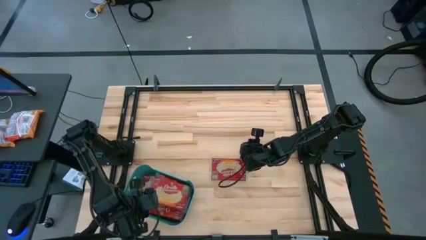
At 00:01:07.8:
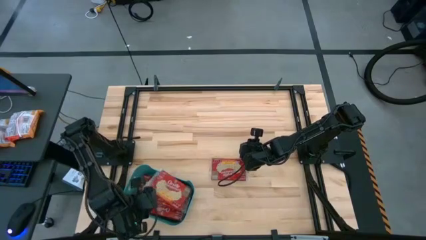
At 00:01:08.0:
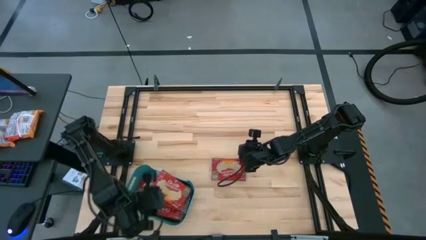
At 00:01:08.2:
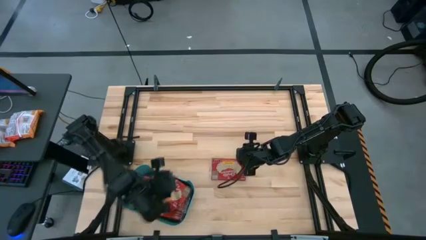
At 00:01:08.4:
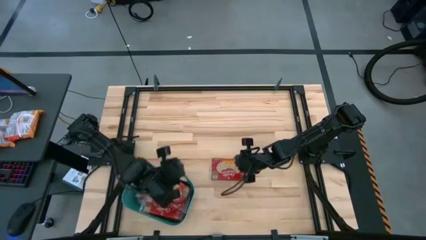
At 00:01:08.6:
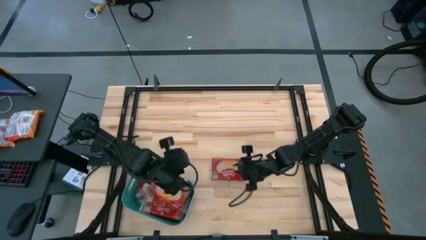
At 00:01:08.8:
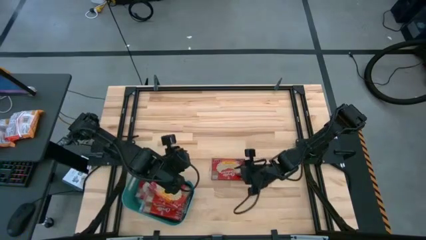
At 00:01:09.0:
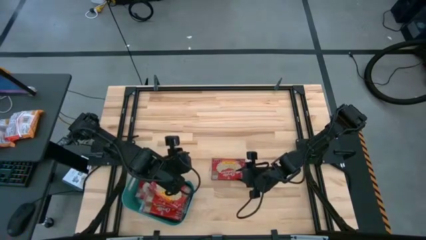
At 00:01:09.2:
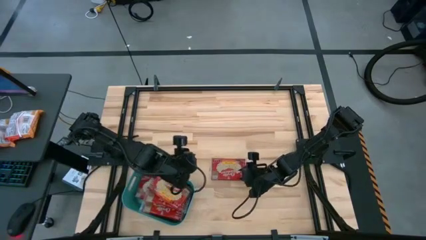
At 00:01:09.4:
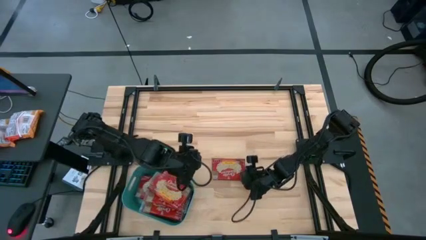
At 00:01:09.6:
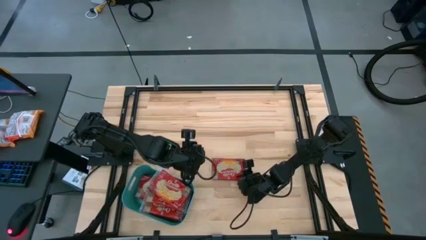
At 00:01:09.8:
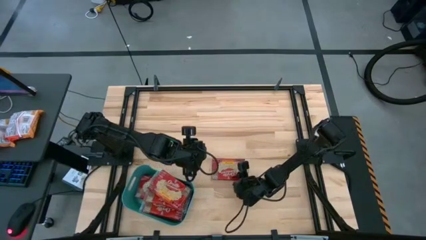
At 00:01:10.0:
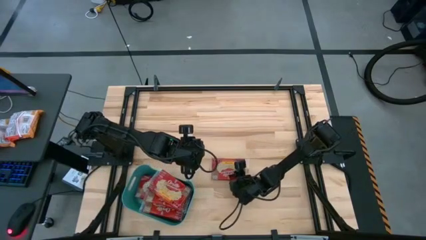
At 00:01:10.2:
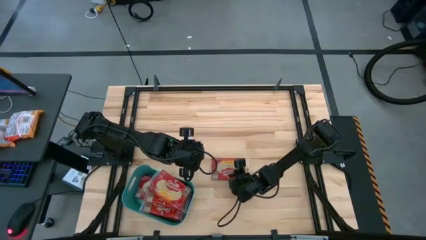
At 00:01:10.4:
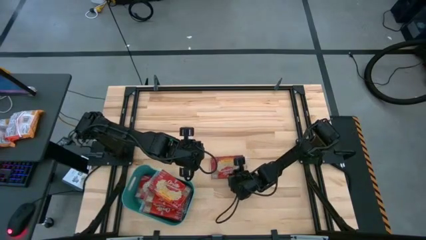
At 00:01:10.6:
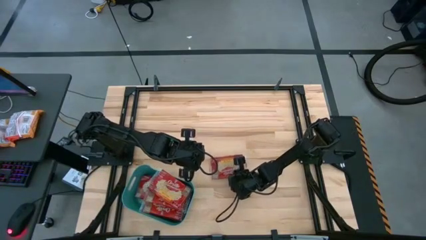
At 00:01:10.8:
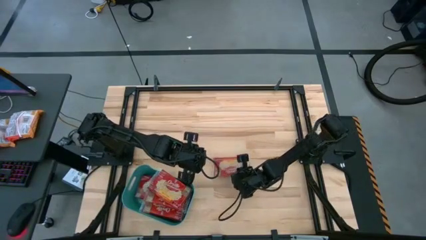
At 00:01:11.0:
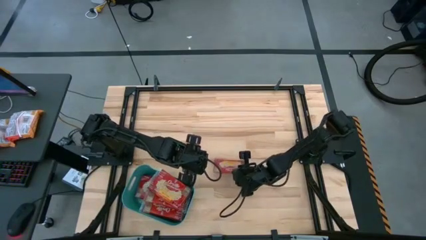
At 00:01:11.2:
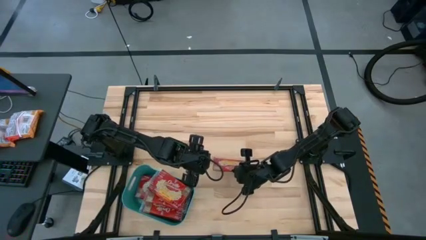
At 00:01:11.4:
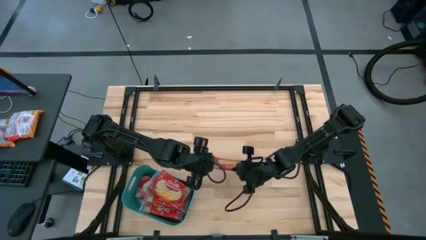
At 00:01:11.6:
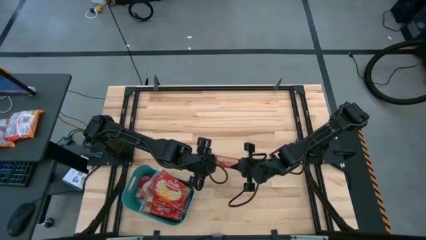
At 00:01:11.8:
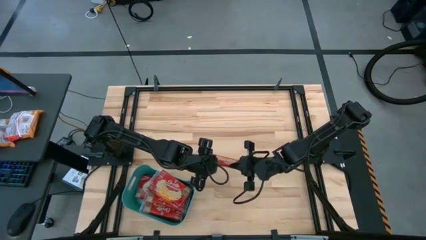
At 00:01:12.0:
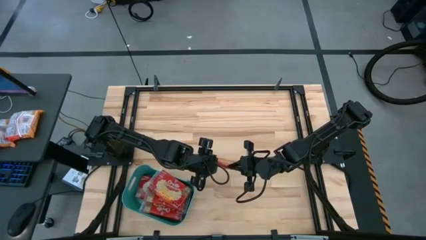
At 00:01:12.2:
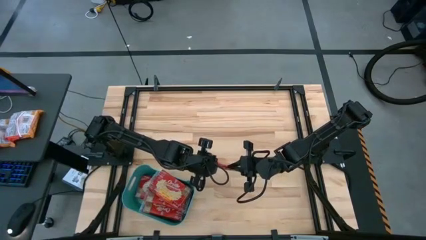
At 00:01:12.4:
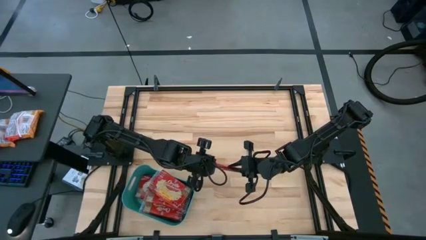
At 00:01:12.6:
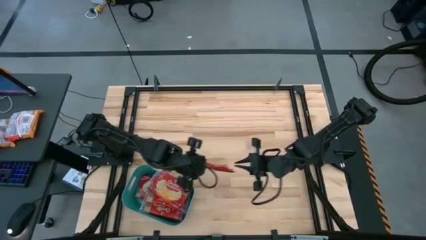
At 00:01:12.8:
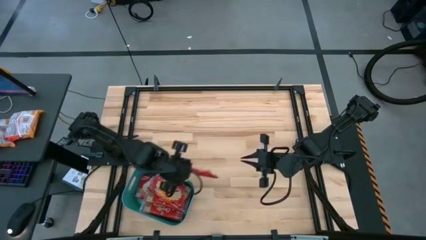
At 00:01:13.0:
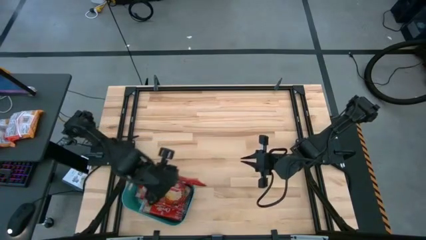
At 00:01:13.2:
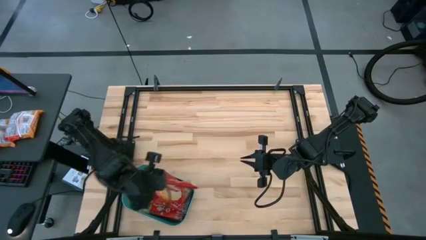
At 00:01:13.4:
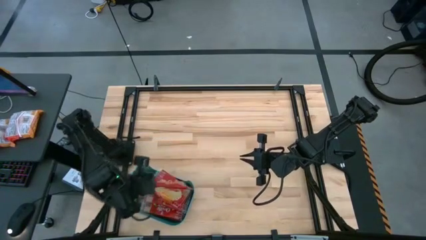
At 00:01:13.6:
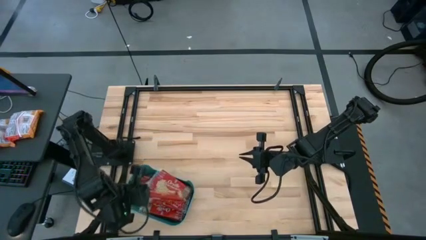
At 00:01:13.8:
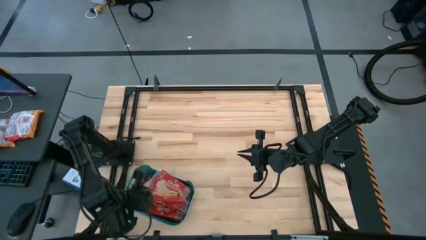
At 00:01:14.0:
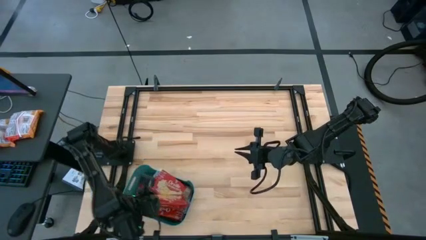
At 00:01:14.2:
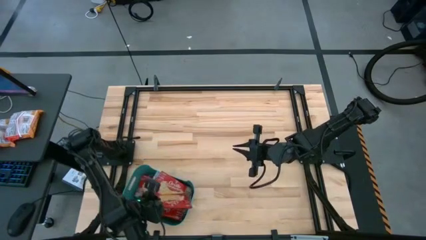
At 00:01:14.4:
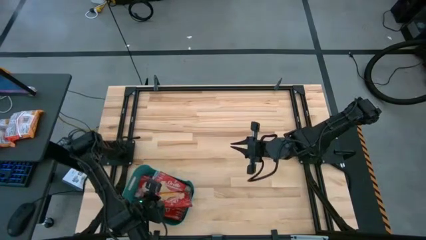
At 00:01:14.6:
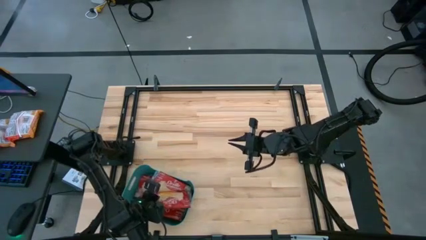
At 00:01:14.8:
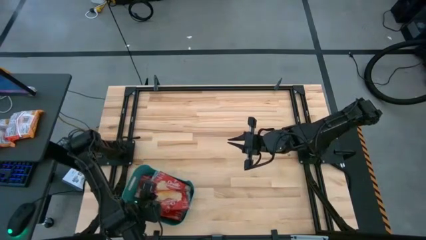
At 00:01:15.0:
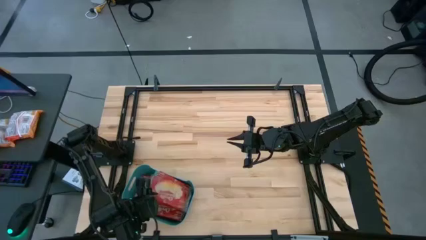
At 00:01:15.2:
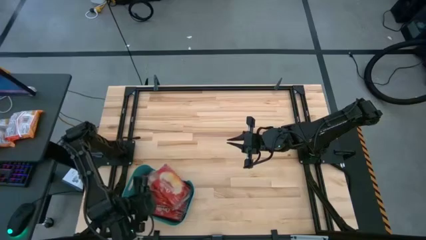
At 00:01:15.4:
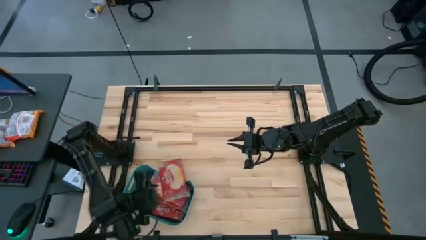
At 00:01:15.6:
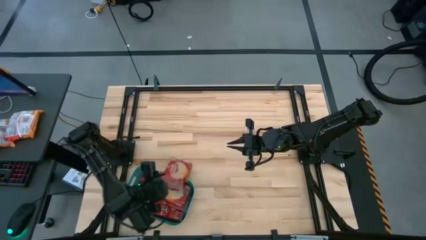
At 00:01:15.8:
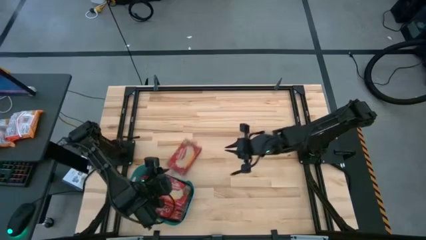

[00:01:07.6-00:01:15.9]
Task: Sort popcorn bags into baskets
Put the popcorn bag into the blue bin

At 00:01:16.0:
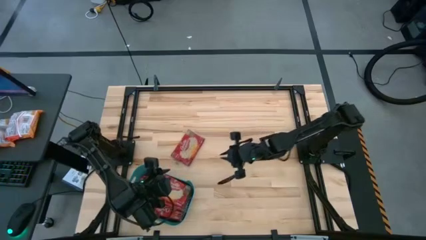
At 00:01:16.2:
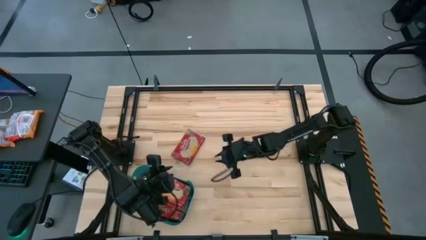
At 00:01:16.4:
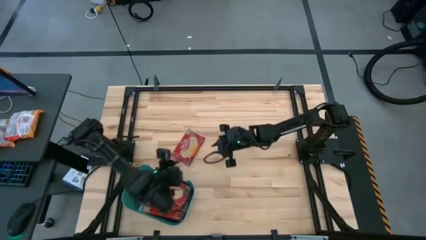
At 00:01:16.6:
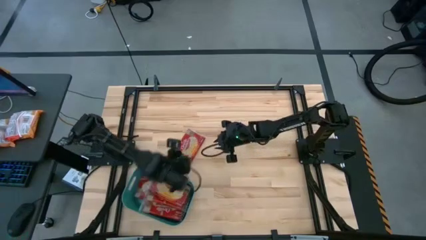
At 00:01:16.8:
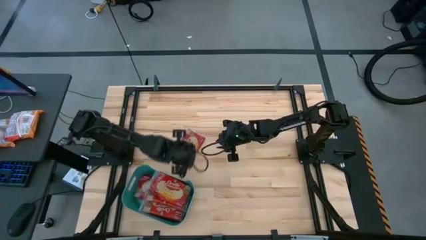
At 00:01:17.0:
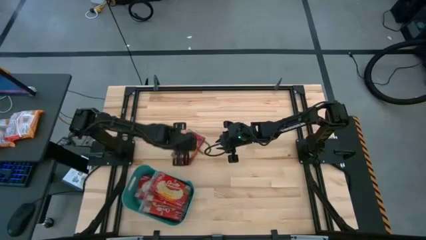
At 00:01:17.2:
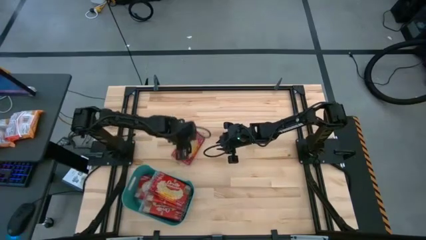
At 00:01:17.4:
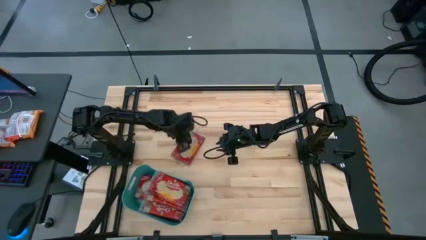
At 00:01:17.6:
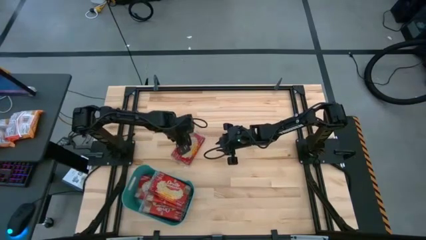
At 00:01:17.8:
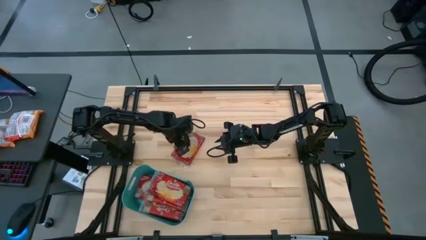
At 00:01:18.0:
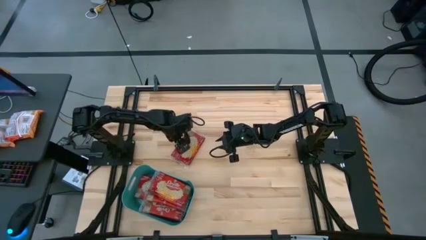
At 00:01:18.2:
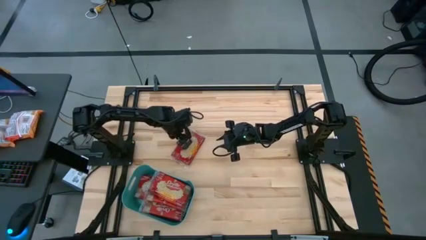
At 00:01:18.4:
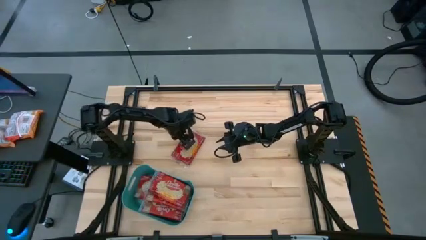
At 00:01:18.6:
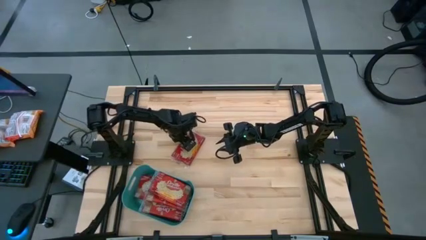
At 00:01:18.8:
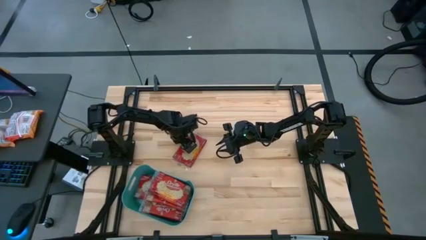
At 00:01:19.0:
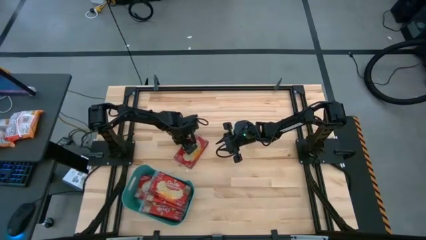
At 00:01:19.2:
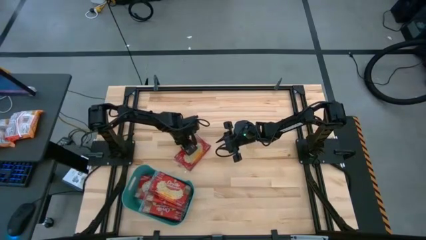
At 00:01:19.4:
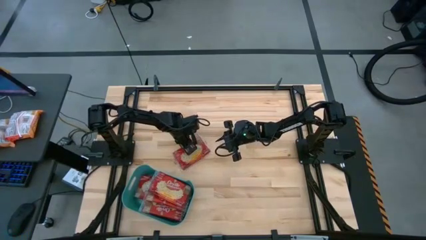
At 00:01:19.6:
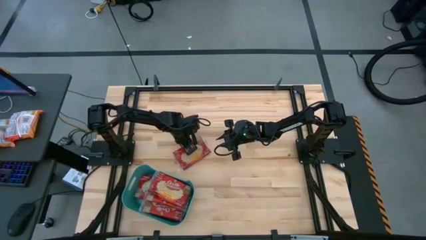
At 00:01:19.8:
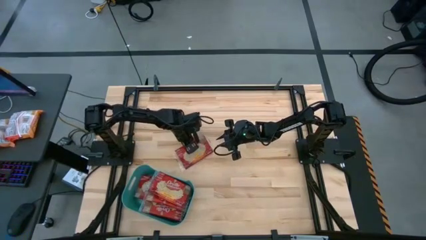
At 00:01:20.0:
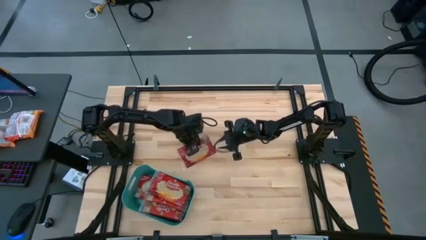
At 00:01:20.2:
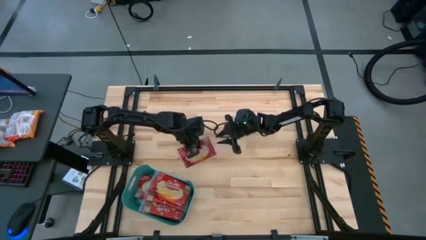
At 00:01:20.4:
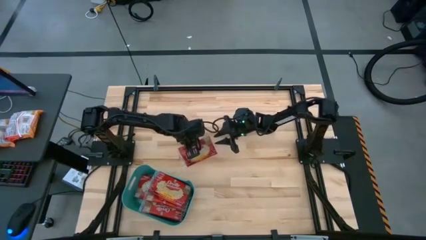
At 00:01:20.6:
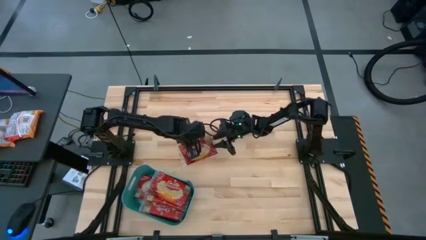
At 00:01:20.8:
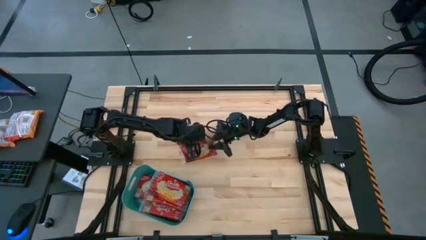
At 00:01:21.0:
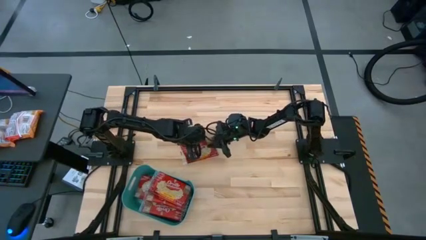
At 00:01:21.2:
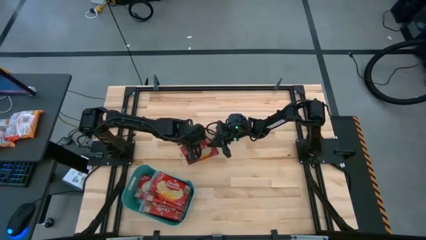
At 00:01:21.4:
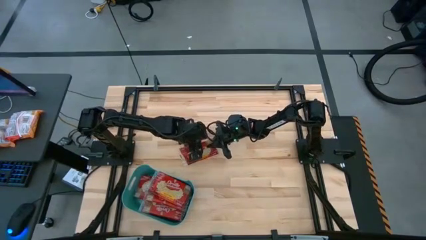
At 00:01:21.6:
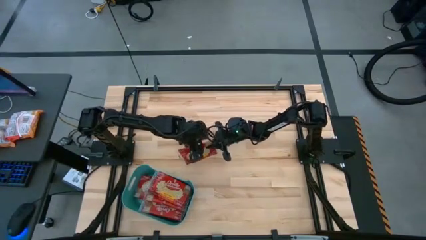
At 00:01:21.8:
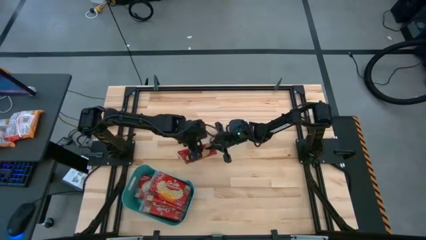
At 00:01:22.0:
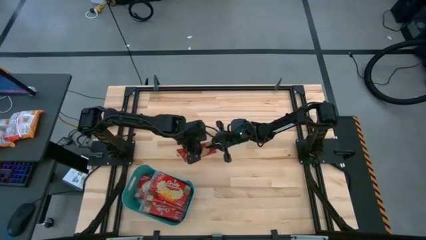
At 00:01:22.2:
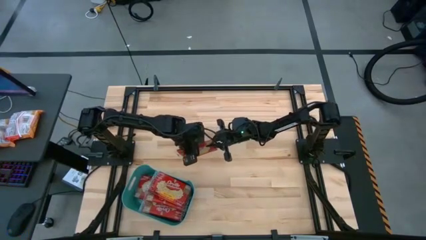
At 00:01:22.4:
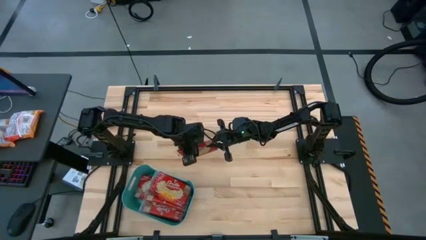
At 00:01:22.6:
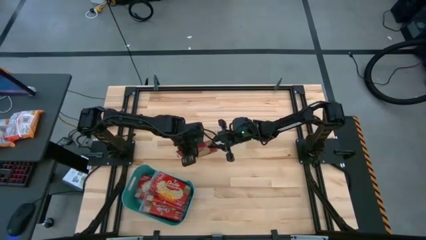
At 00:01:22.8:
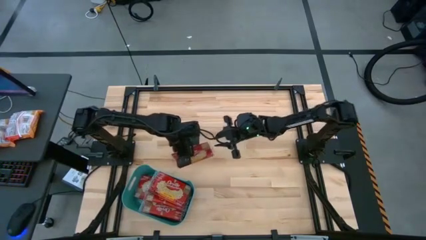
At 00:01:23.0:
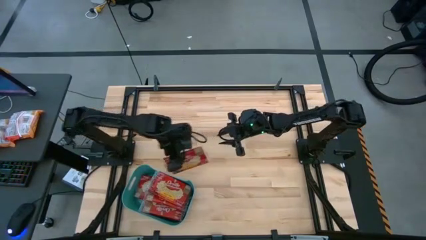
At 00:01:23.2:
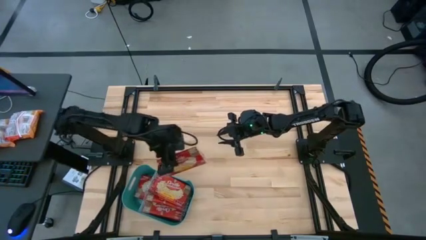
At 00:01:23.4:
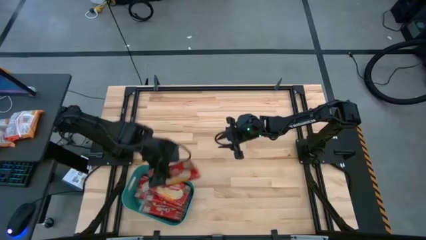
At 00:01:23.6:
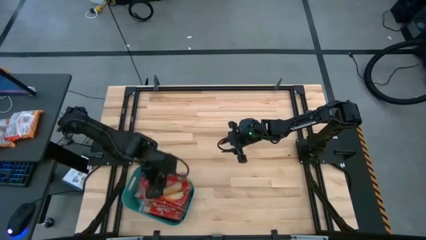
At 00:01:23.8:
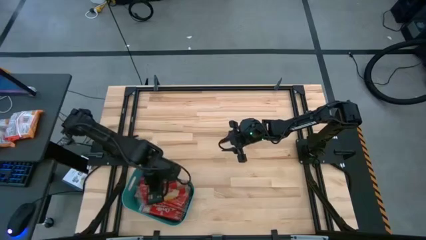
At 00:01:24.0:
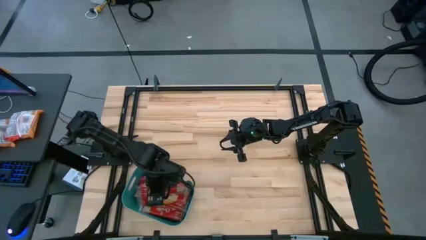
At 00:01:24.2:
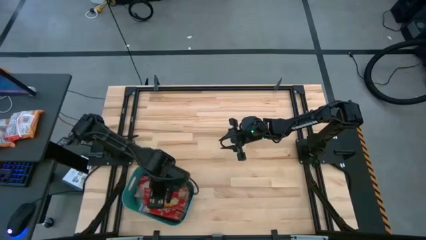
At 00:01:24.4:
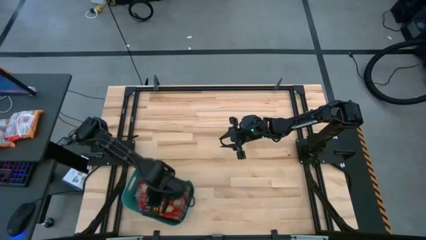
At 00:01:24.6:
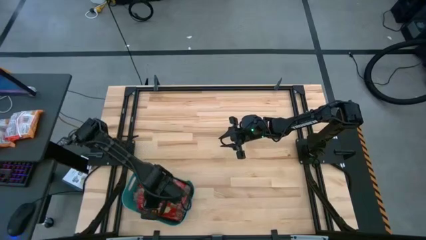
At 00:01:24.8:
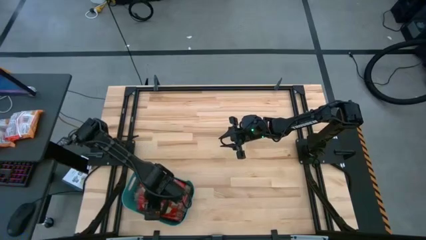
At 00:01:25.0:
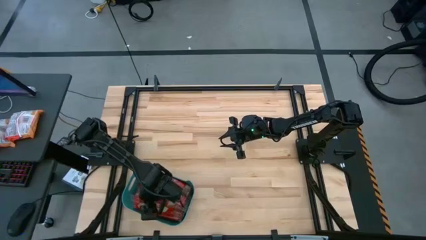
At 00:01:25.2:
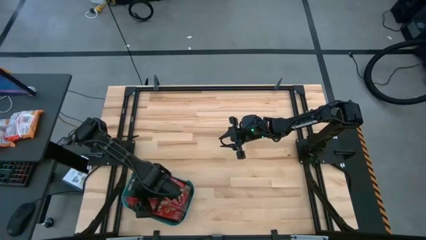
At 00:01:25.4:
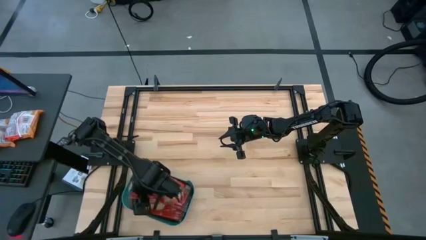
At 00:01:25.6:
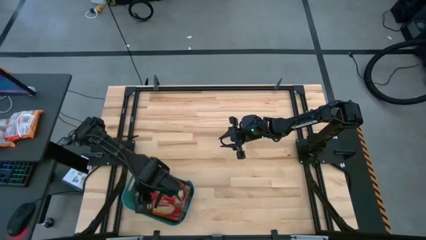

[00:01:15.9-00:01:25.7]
Put the popcorn bag into the blue bin
